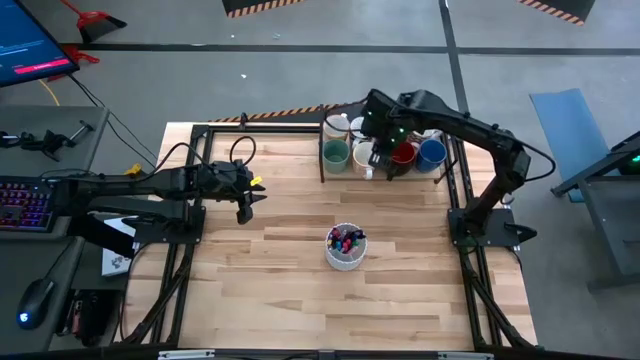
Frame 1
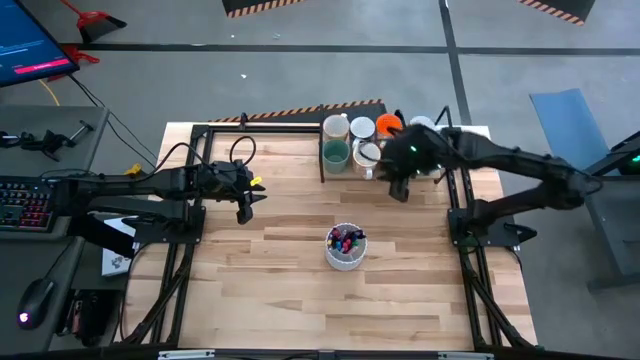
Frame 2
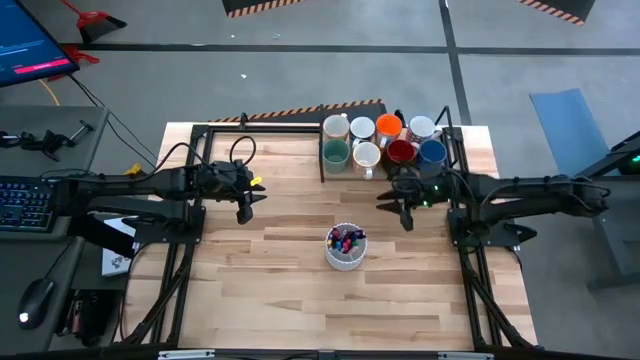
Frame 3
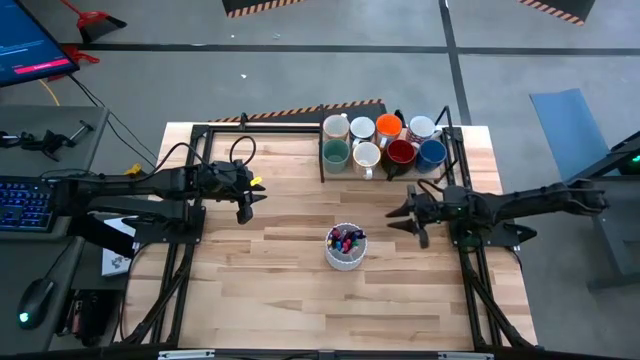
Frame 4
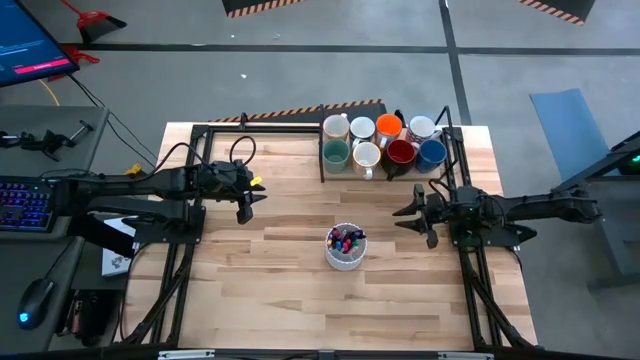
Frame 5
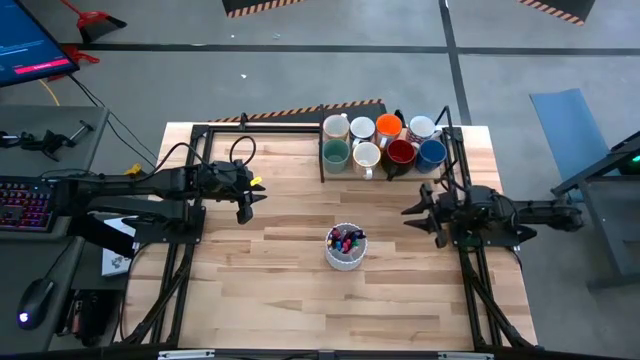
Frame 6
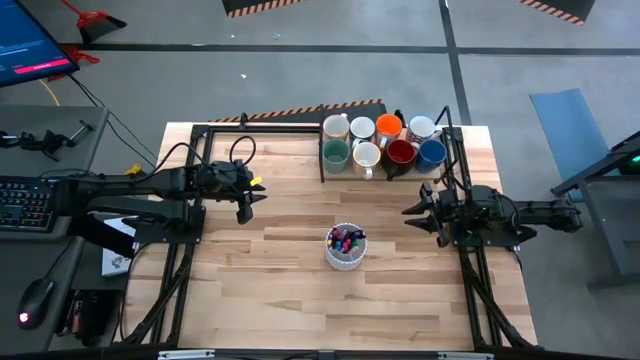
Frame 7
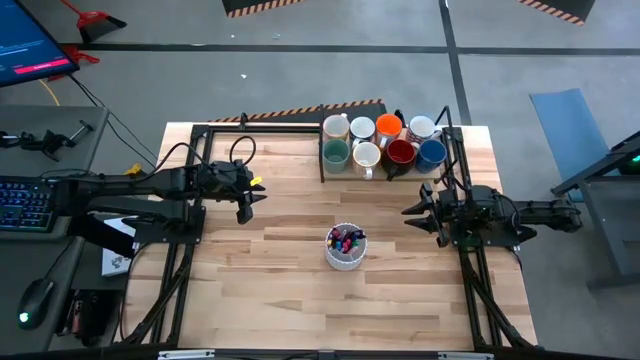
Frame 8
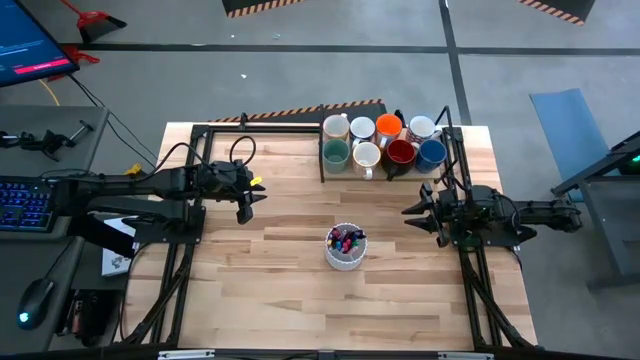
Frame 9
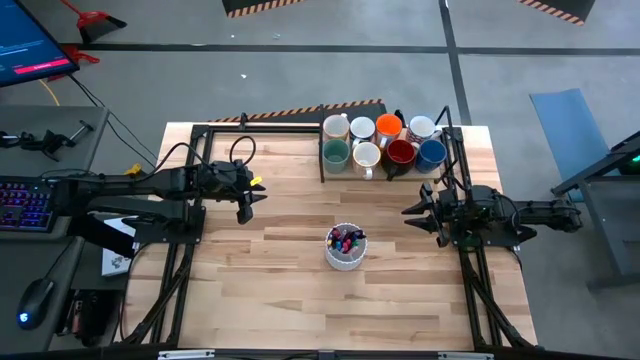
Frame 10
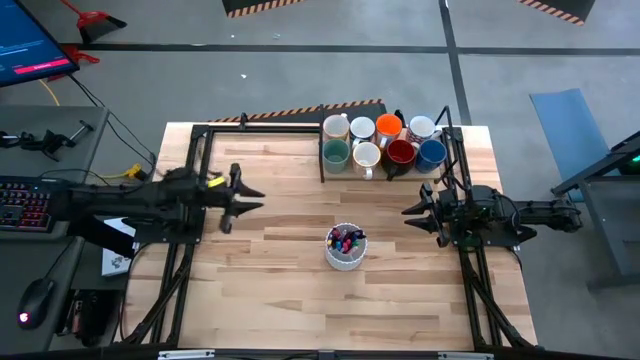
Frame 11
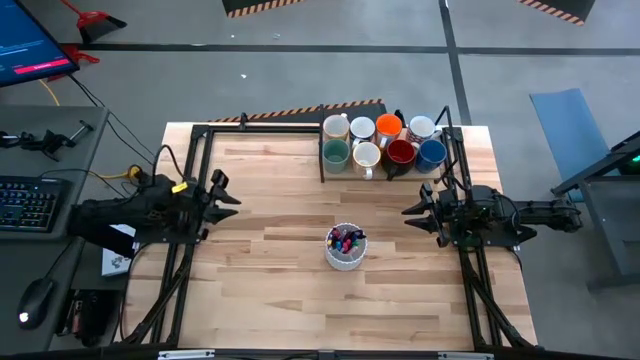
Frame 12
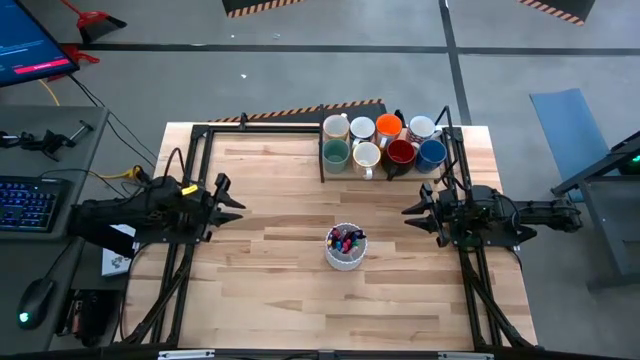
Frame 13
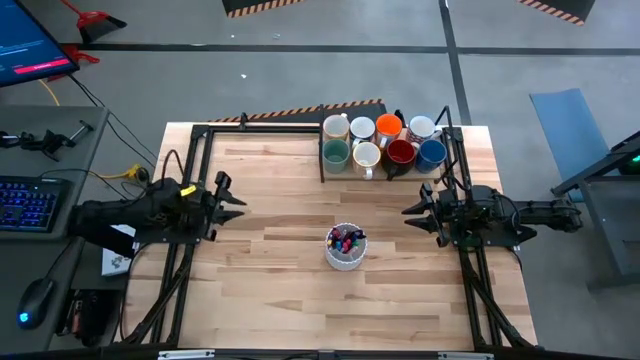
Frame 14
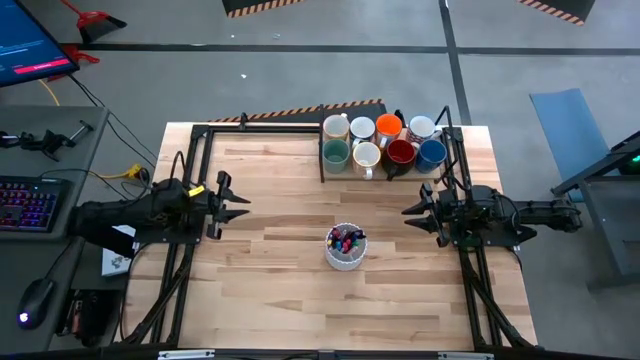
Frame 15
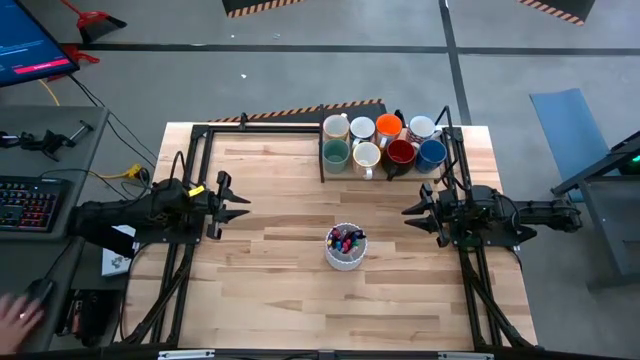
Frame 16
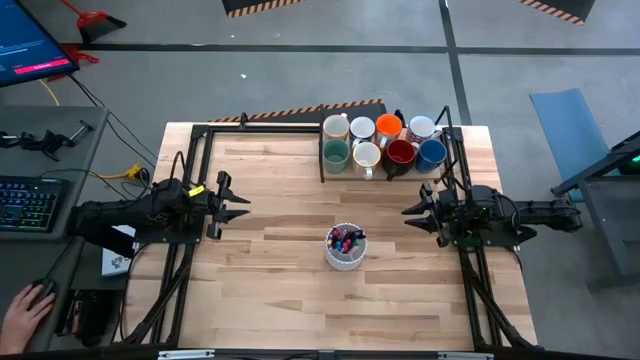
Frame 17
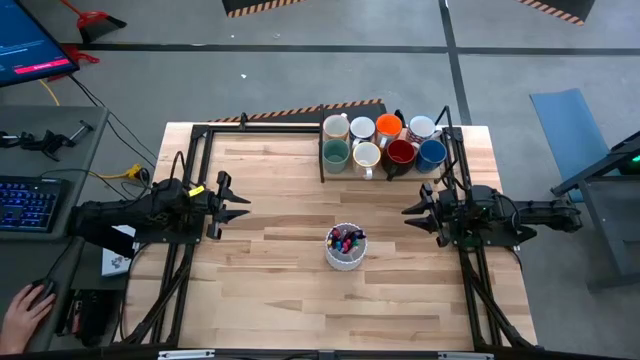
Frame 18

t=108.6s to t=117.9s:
Task: Place coffee mugs
Return to Home Position

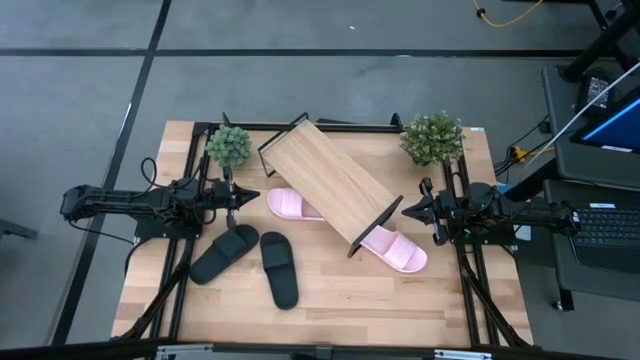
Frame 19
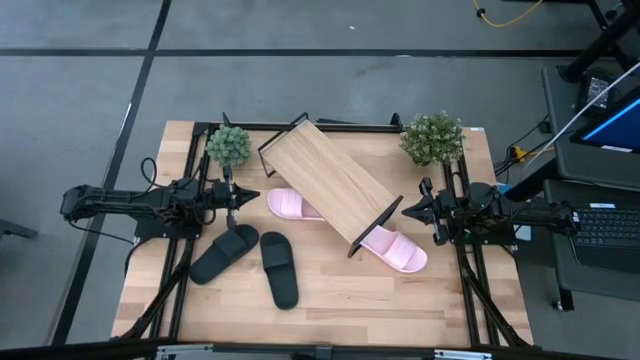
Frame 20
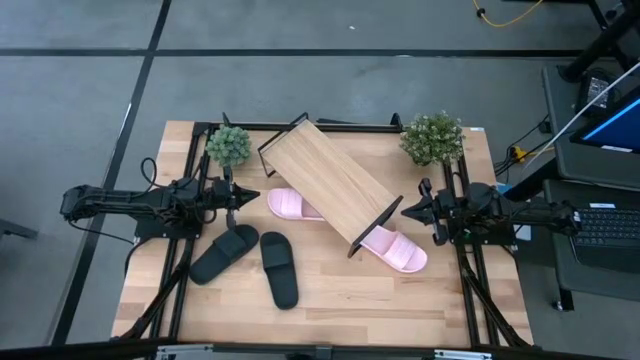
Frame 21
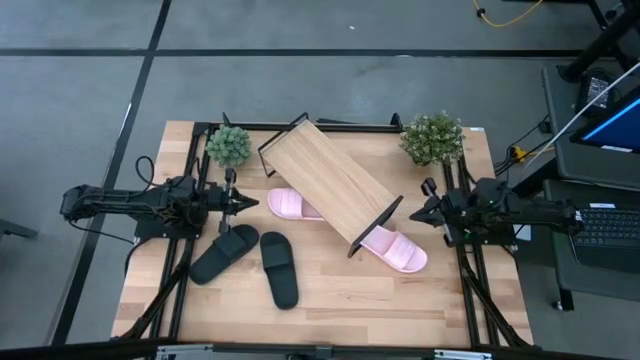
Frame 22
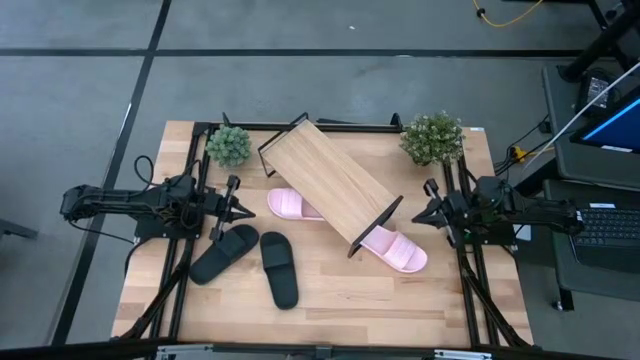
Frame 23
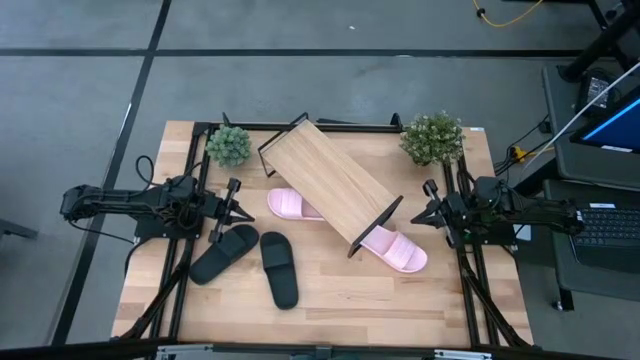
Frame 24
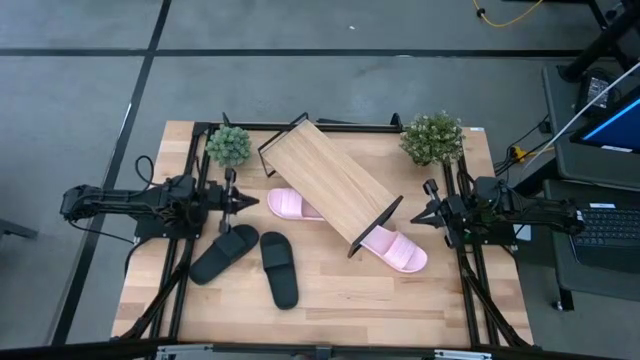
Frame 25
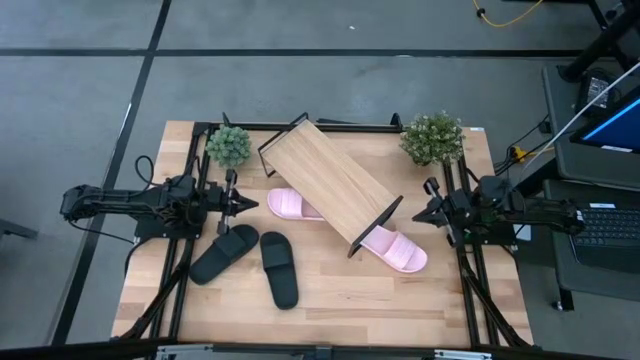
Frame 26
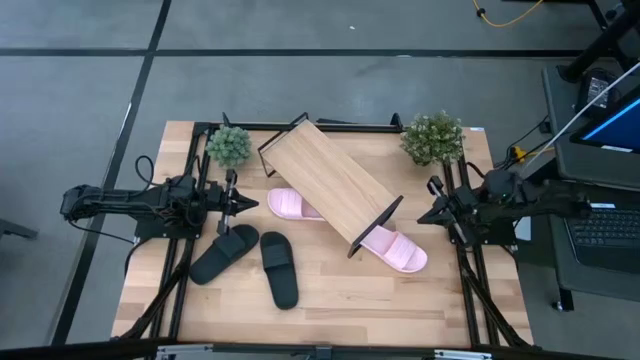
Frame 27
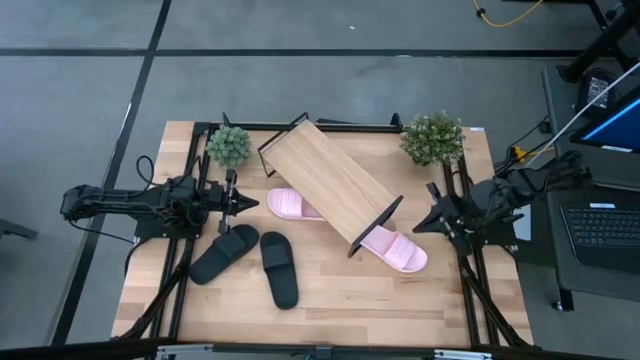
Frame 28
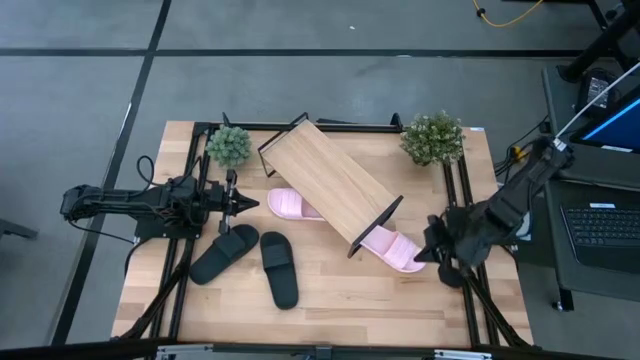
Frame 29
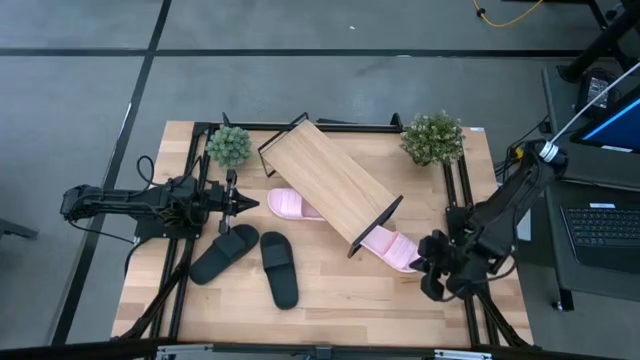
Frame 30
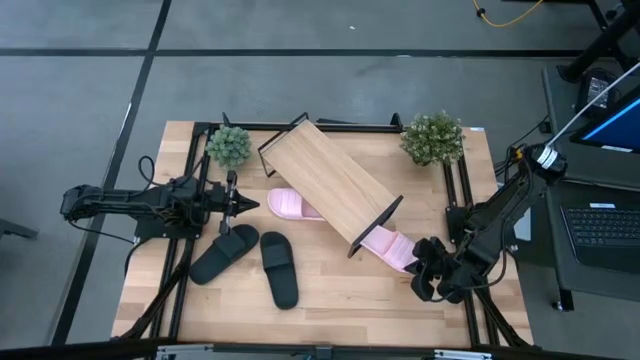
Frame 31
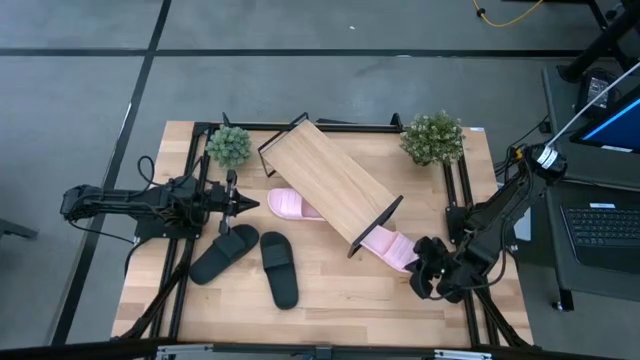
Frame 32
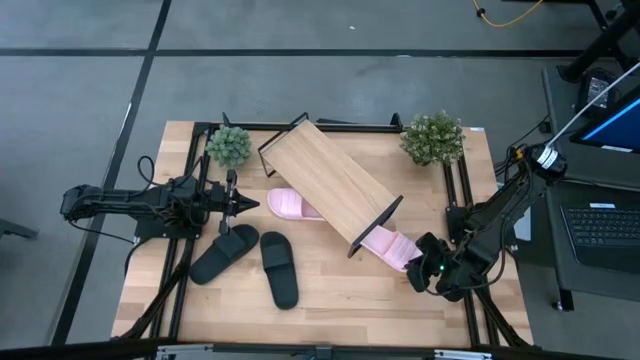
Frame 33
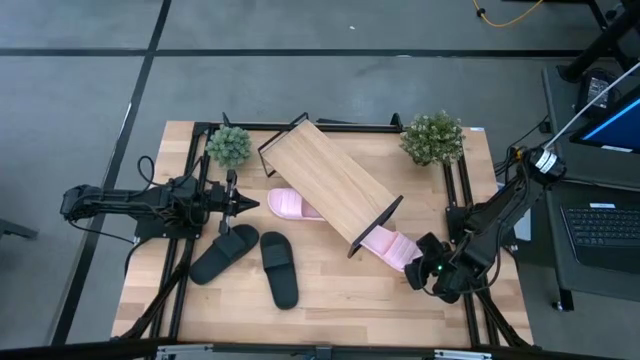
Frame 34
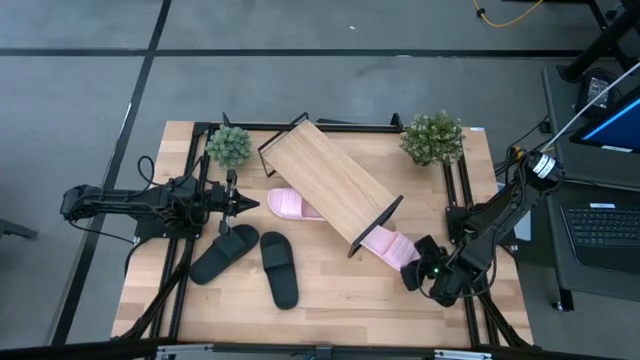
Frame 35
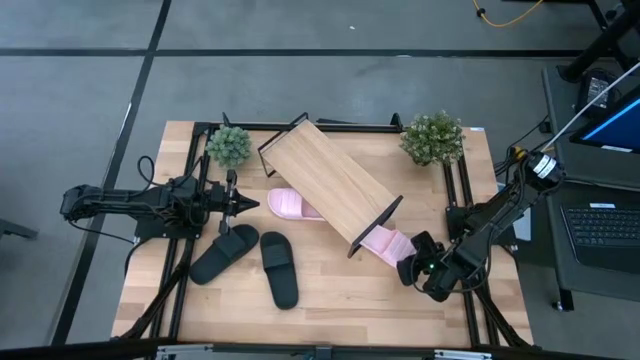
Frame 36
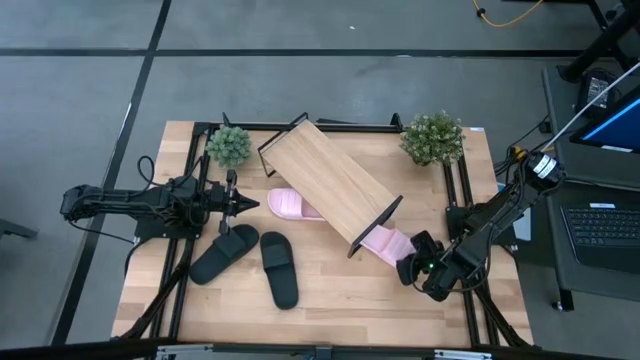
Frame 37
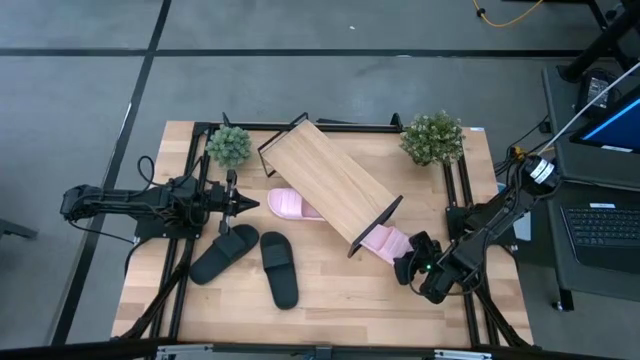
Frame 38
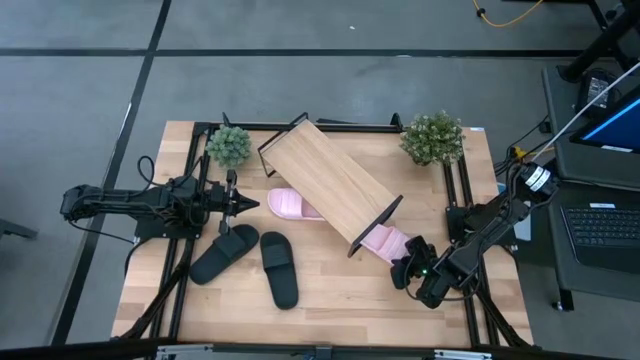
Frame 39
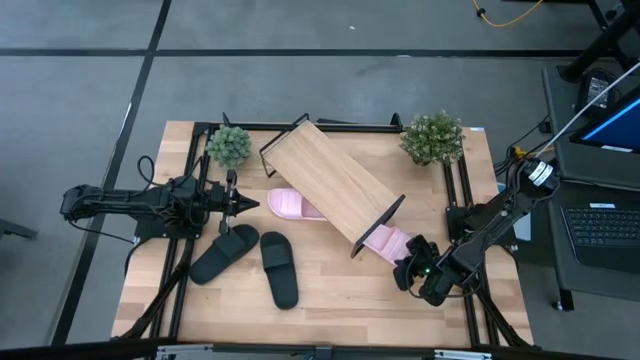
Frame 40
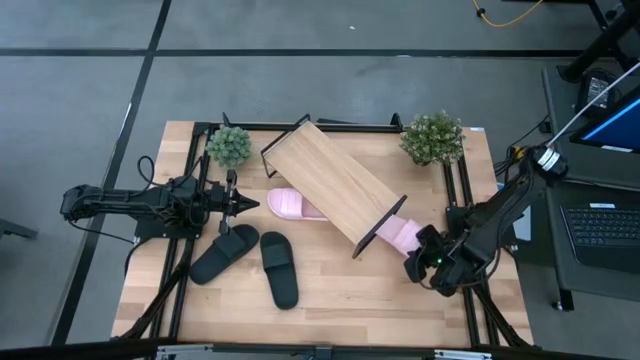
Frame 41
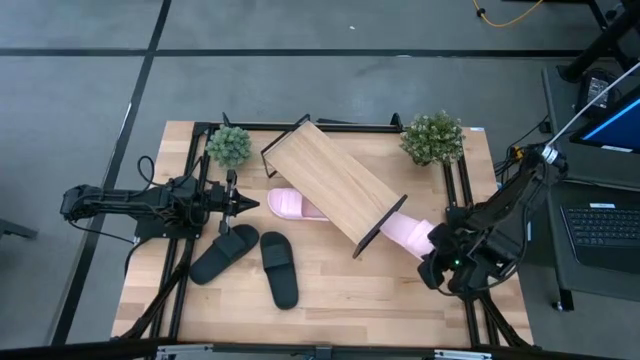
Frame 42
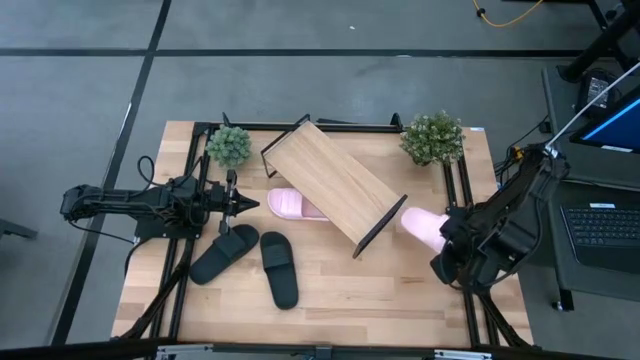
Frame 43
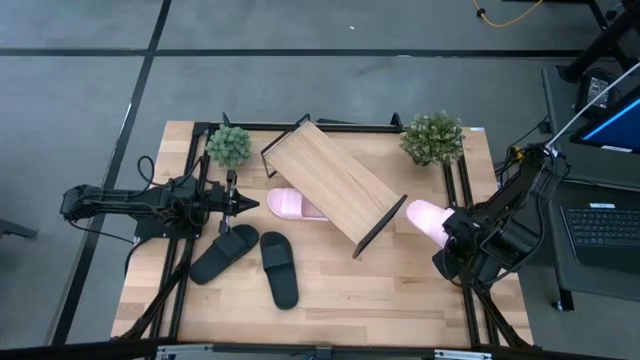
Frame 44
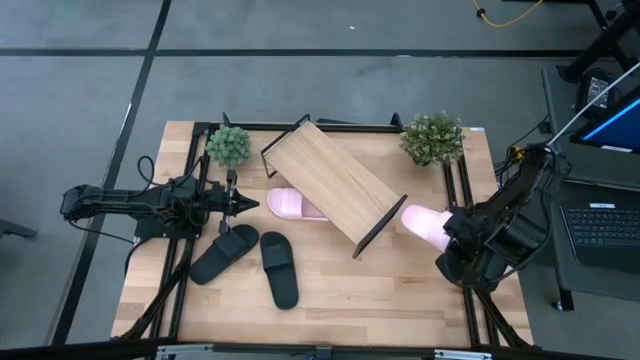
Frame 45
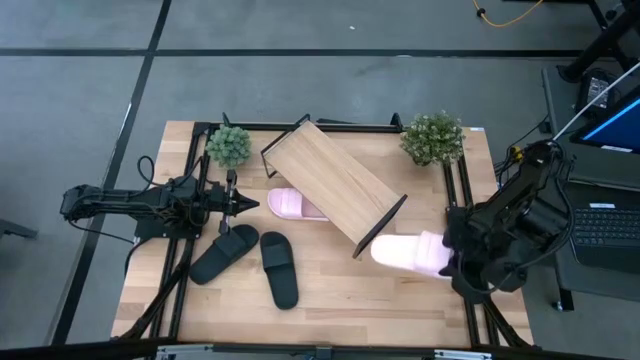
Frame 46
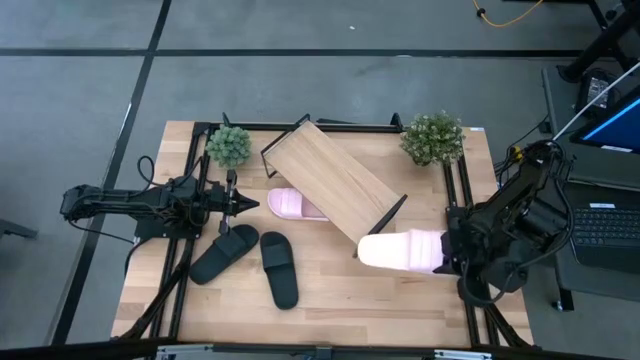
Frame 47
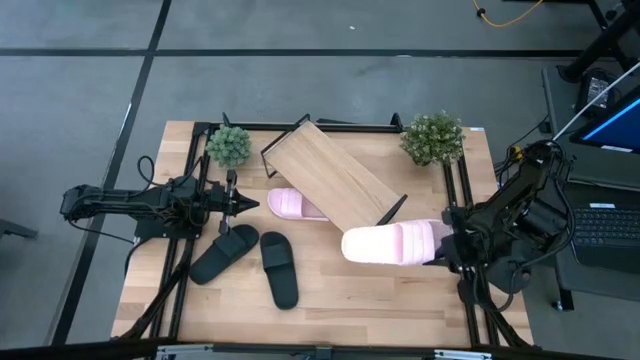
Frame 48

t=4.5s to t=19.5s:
Task: Pick and place slides into the shelf
Put the right pink slipper on the shelf
